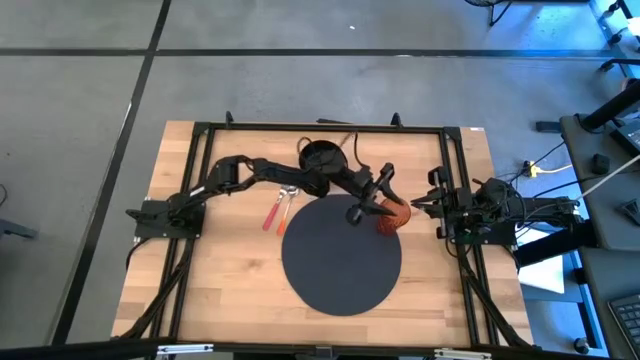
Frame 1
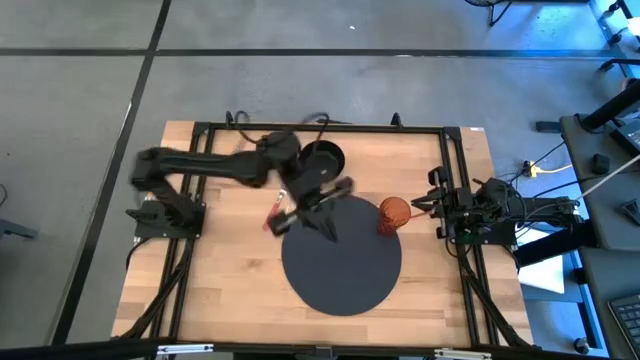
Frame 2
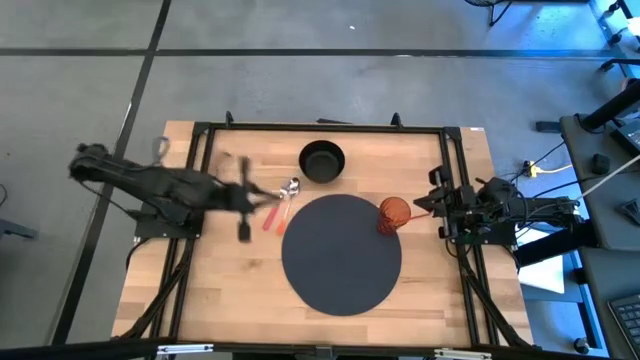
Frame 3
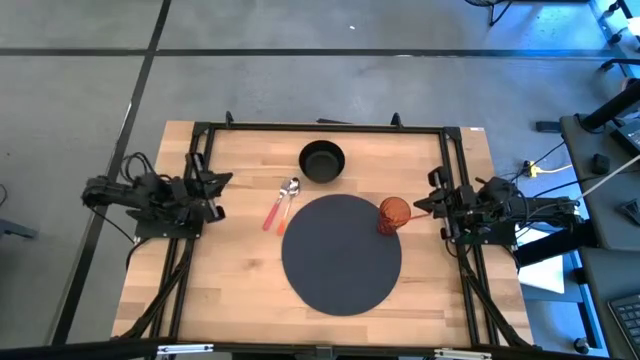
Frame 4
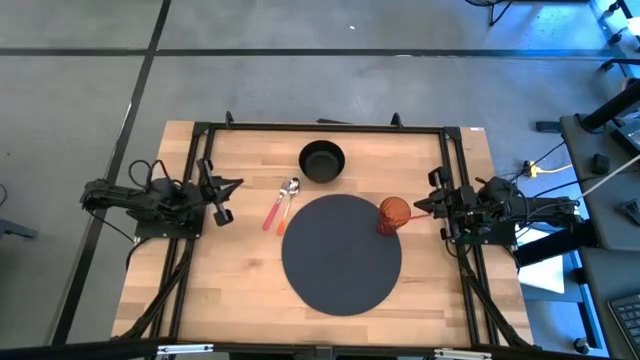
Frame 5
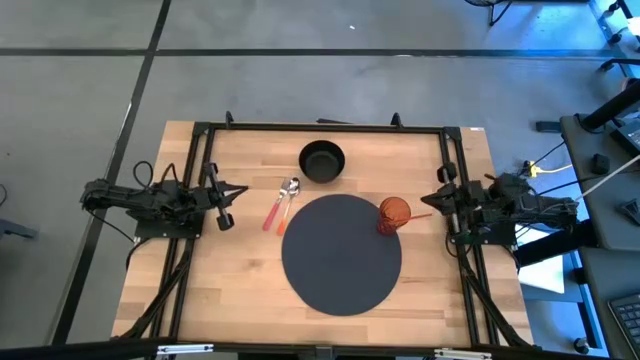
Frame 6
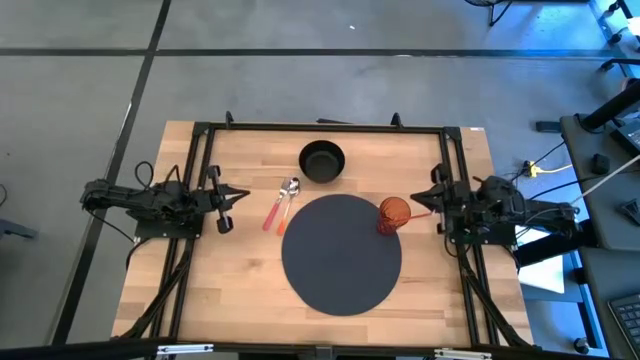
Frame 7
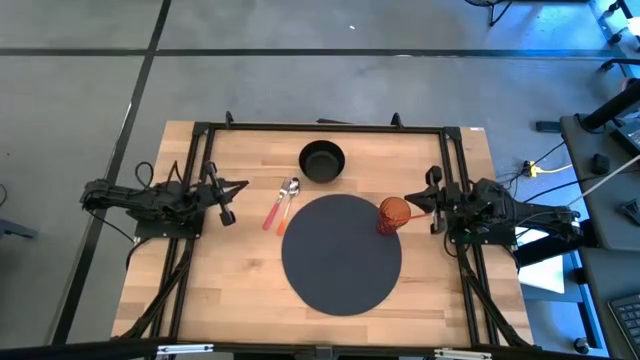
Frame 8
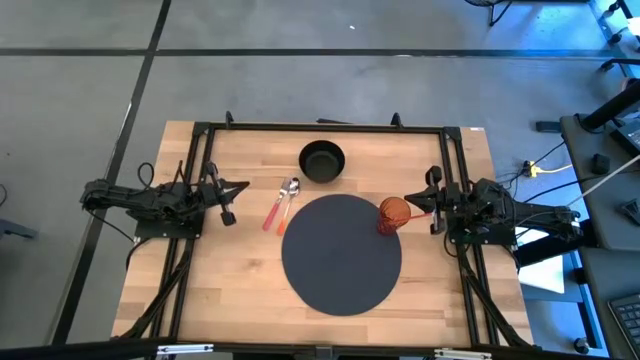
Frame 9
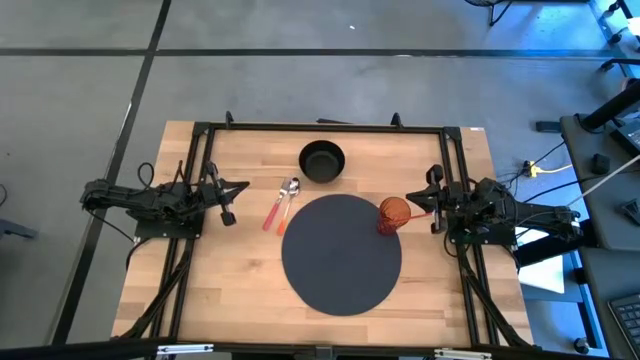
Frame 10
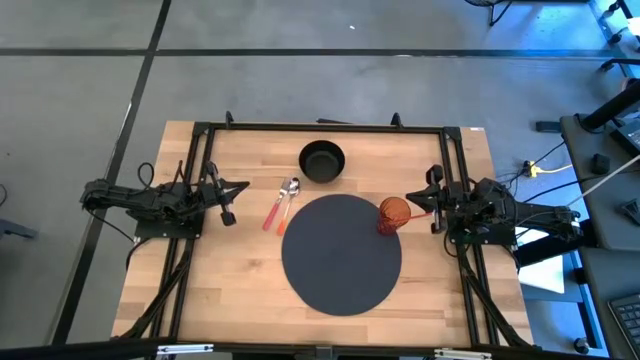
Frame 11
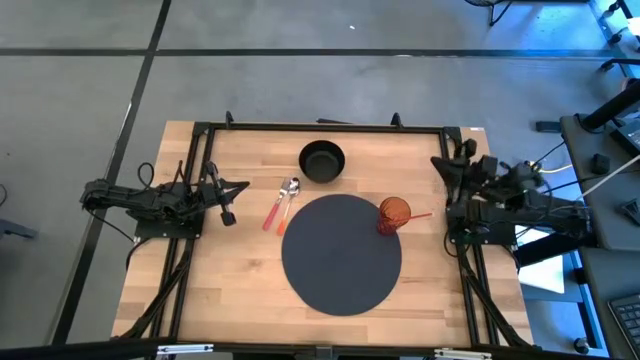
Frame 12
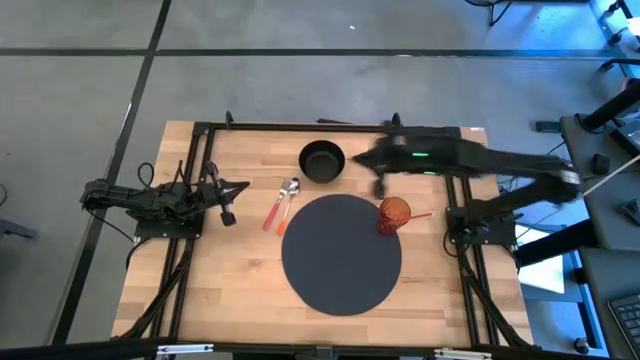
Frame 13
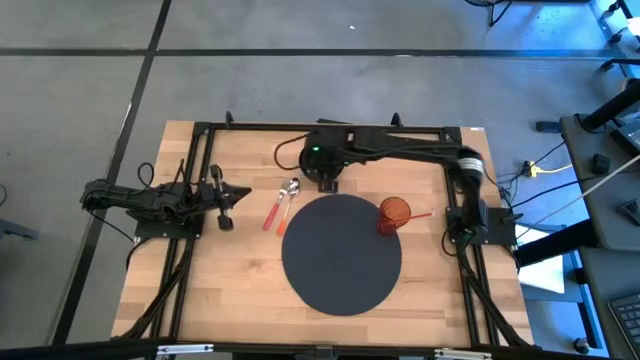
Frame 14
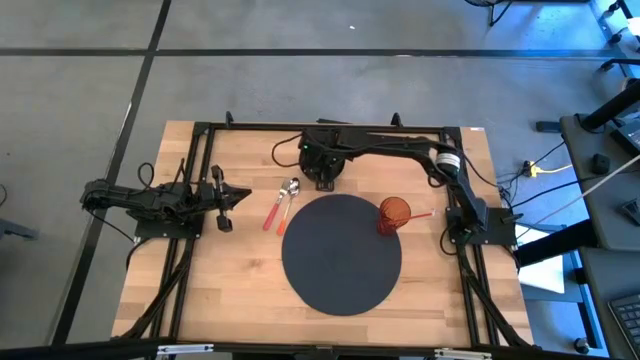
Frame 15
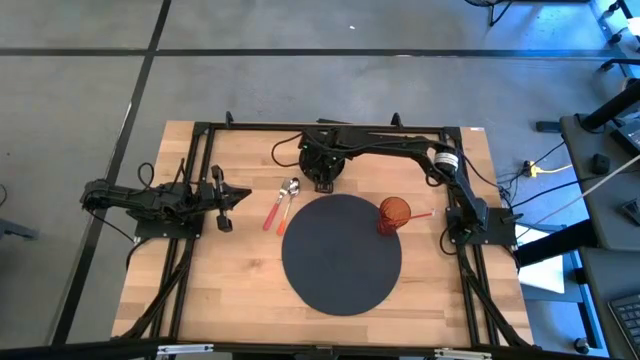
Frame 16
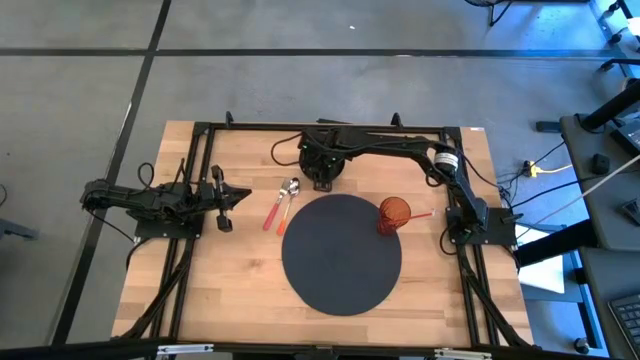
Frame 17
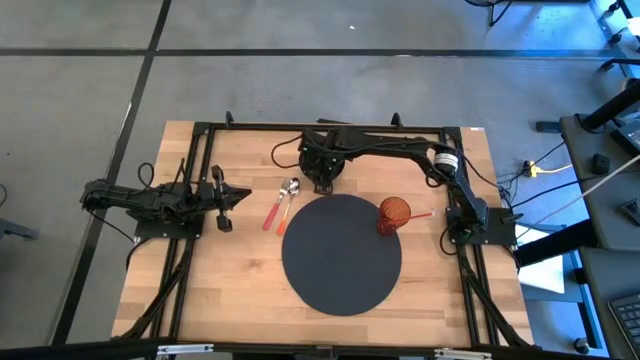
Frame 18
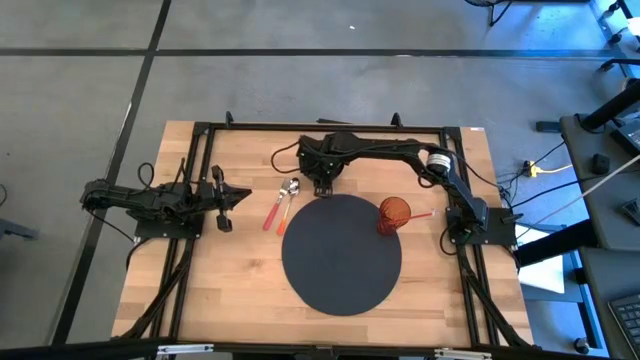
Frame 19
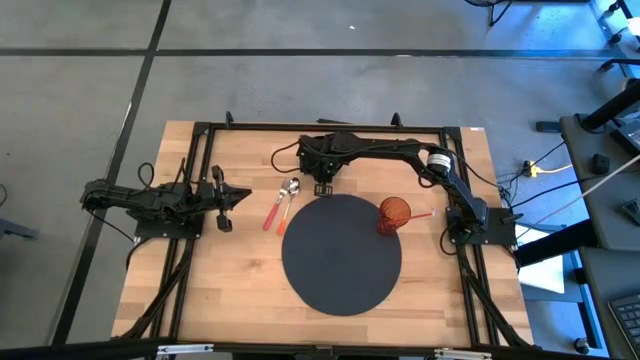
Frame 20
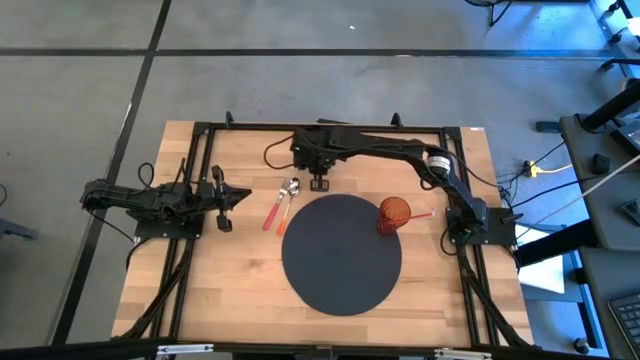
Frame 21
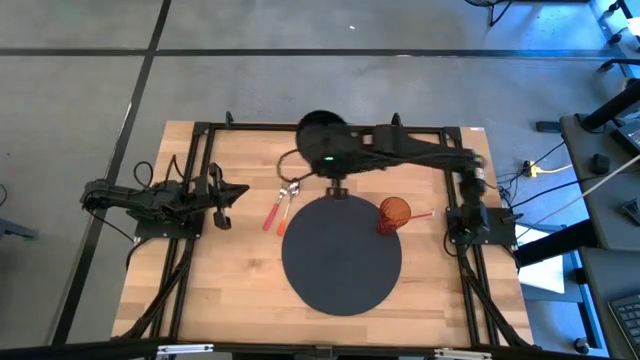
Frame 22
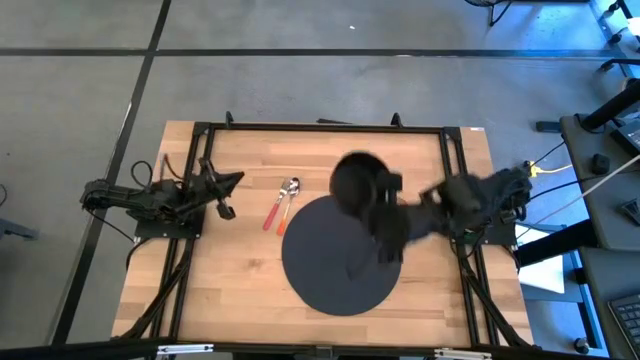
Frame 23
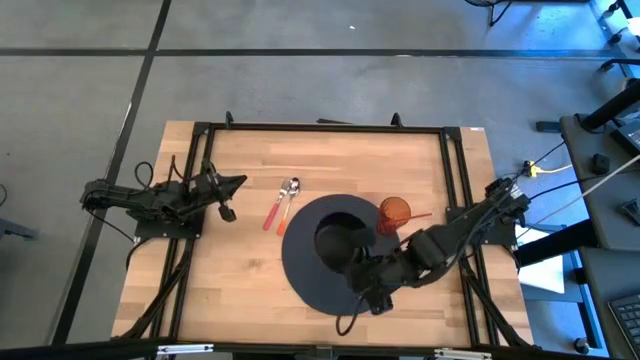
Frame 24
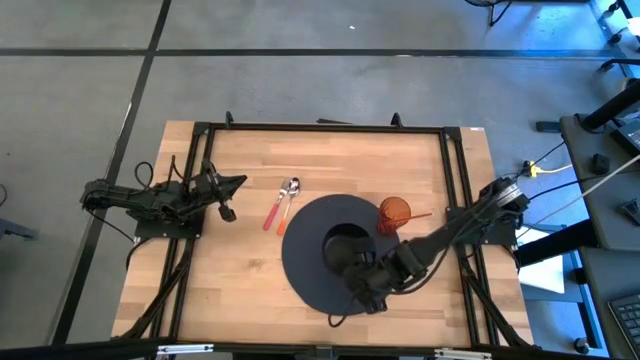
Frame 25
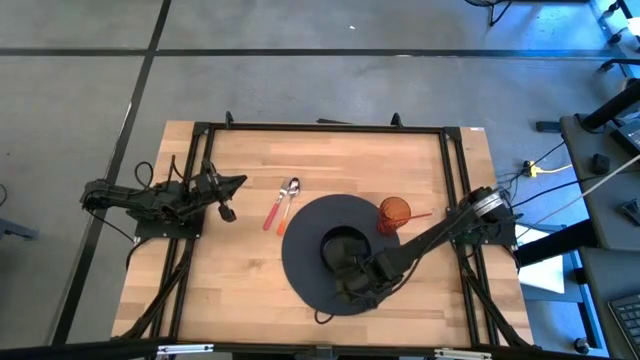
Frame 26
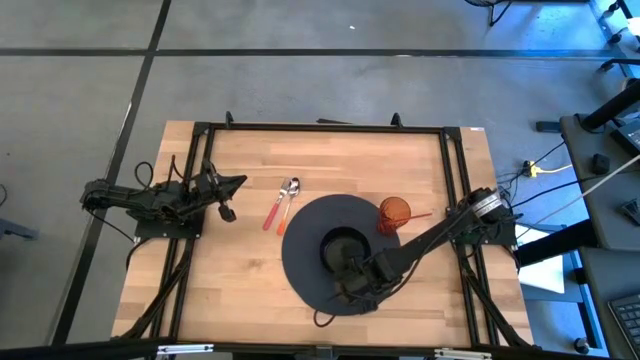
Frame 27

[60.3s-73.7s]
Task: Pick & Place Utensil
Put the black bowl in the center of the gray mat

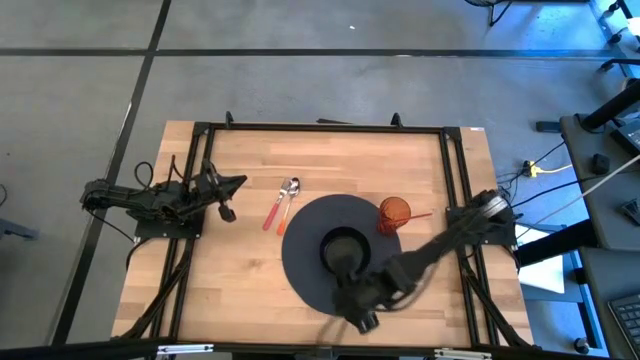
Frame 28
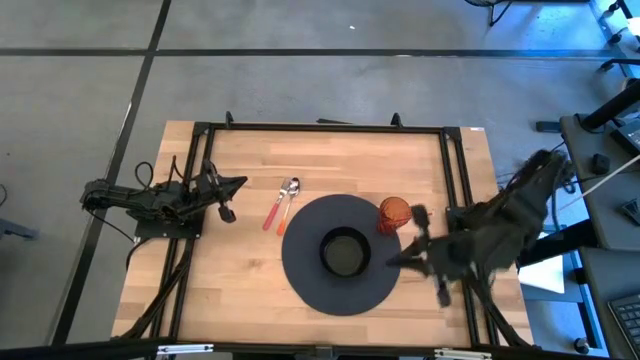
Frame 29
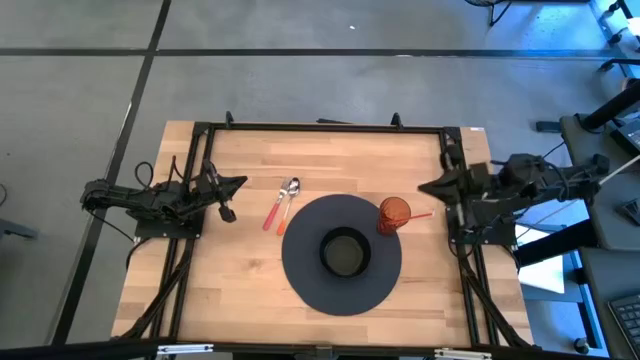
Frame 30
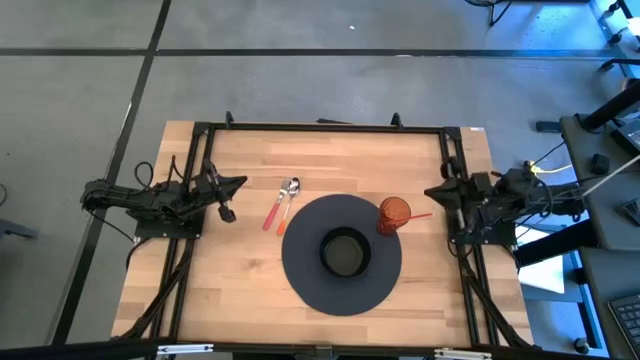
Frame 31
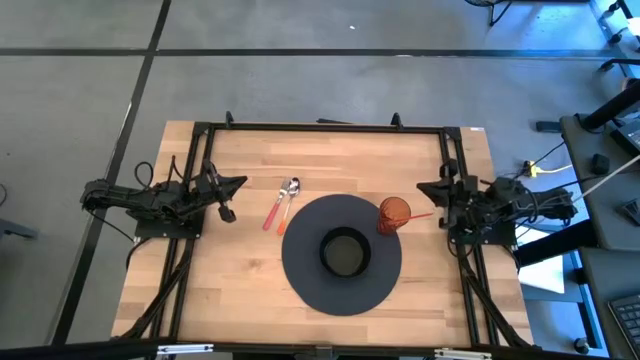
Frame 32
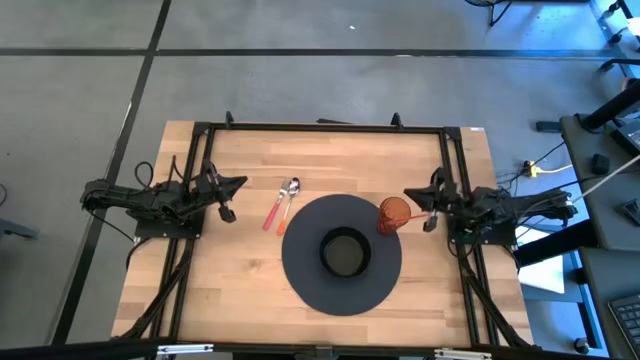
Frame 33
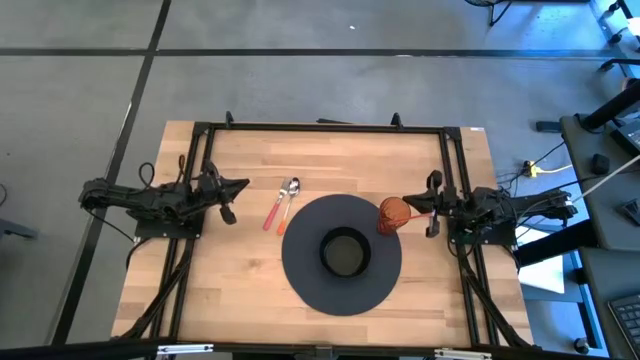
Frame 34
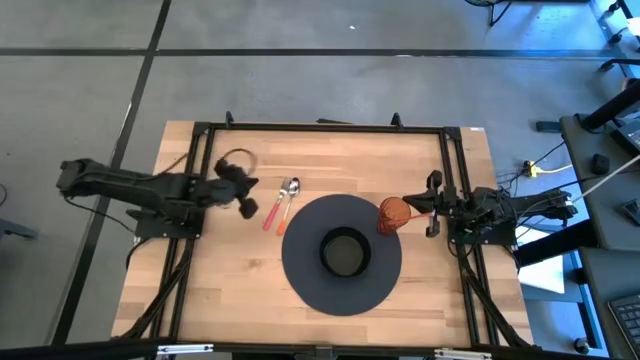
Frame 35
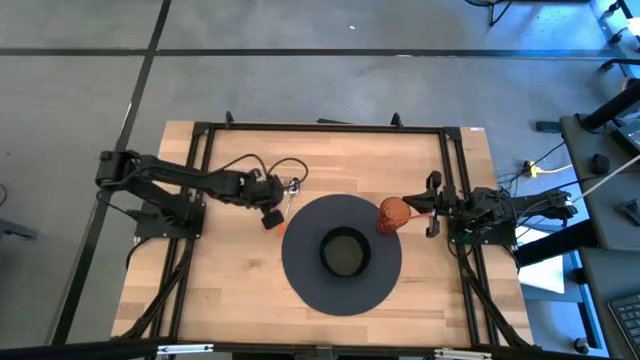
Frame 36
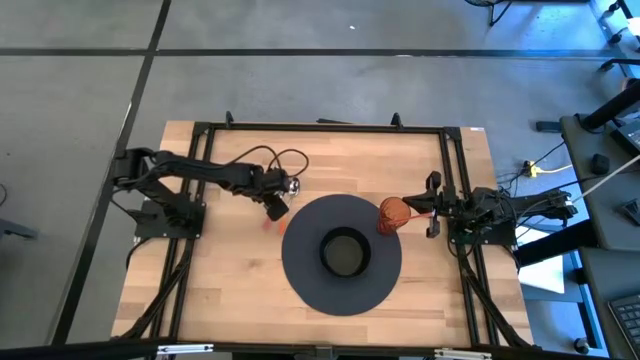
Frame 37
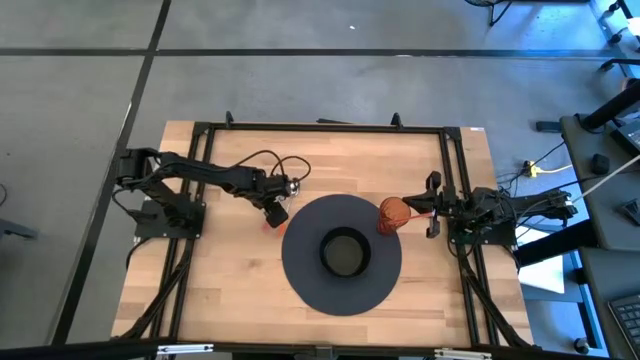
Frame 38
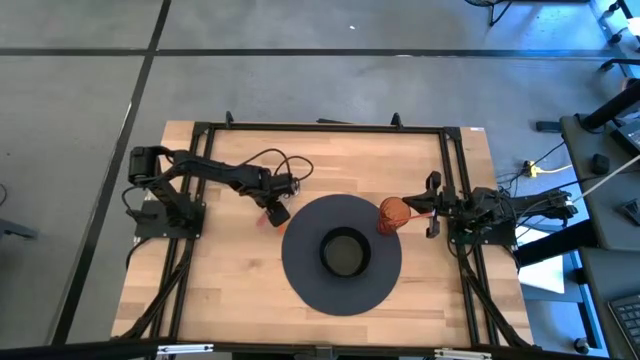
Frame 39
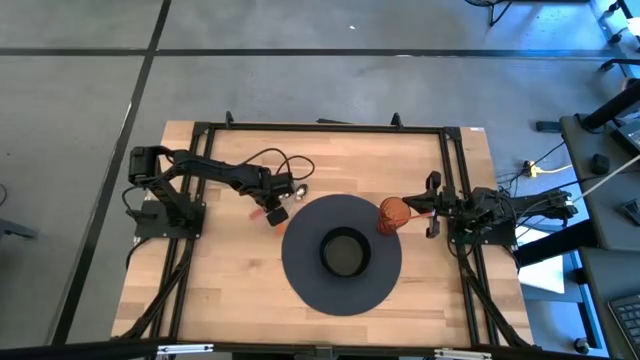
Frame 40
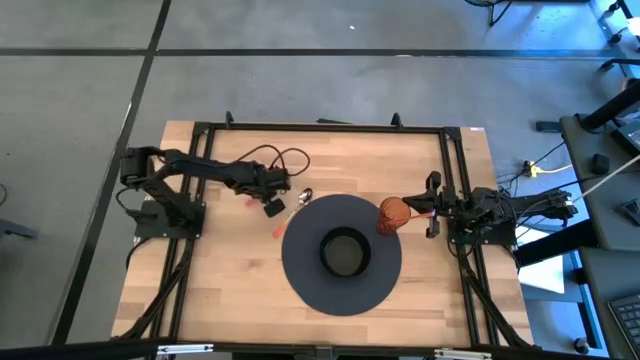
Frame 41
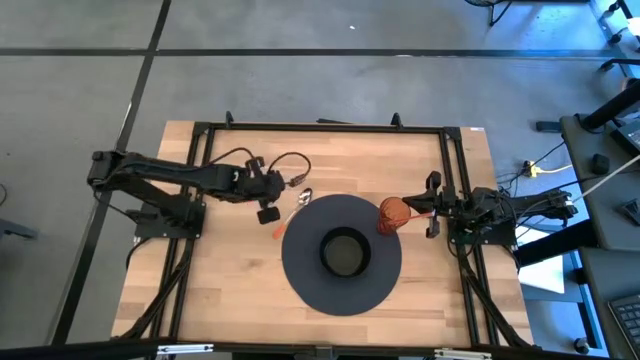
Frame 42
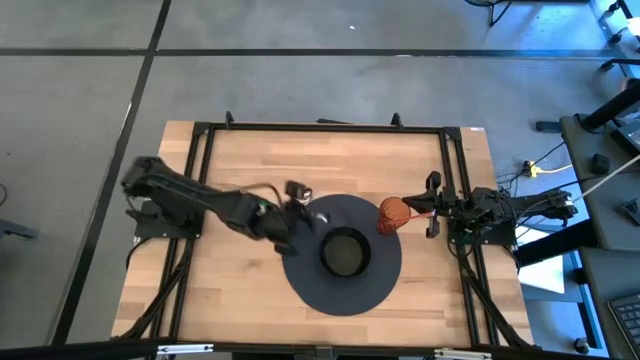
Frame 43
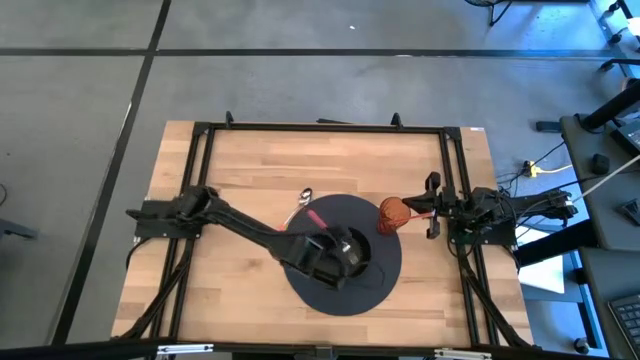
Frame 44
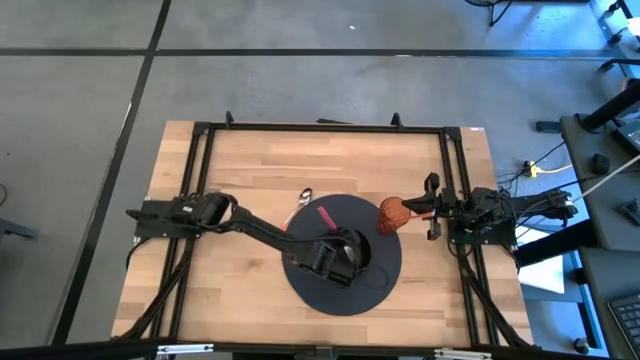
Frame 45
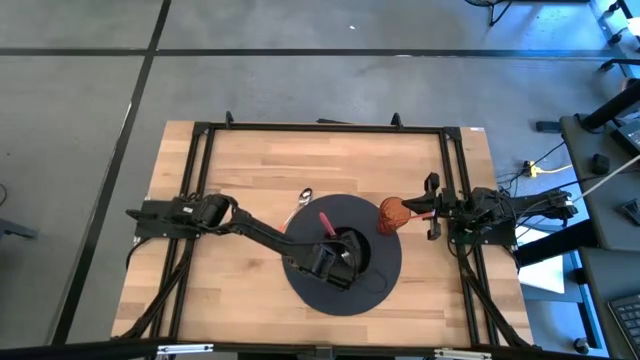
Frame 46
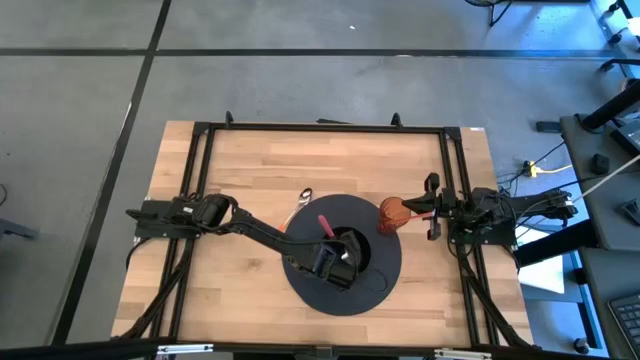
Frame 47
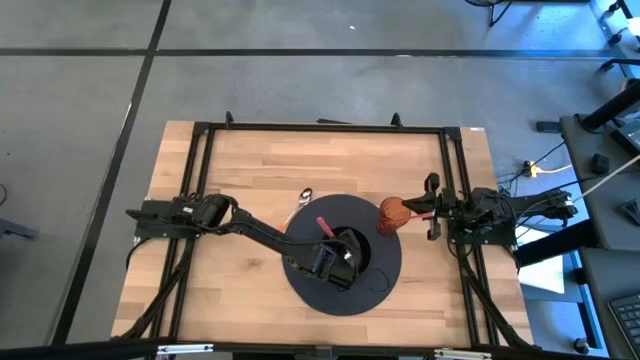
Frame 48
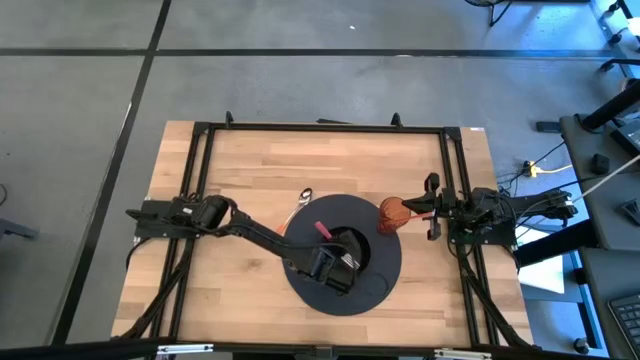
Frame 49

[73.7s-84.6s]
Put the pink fork into the black bowl on the gray mat
